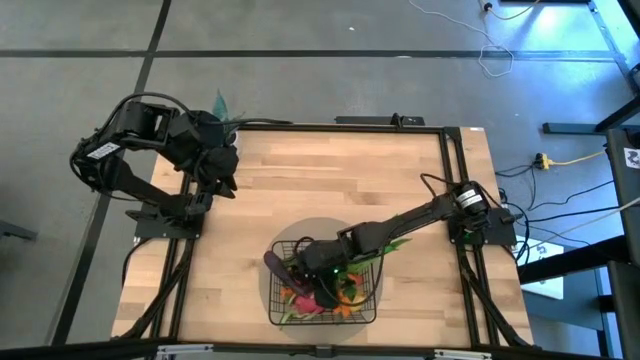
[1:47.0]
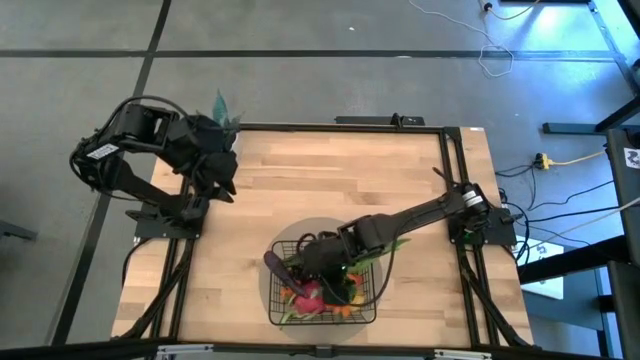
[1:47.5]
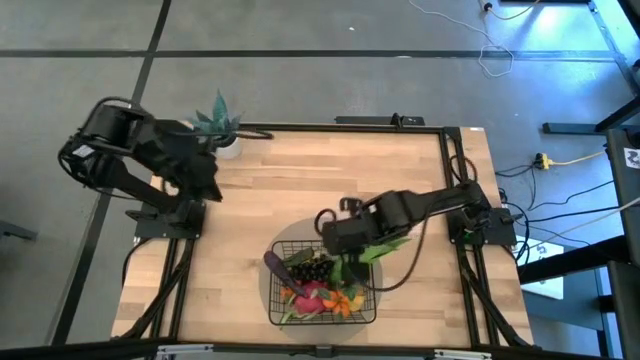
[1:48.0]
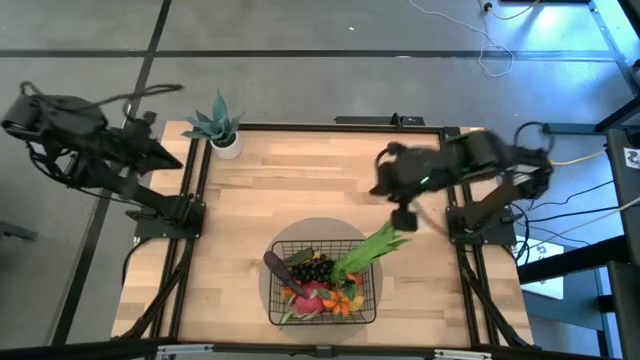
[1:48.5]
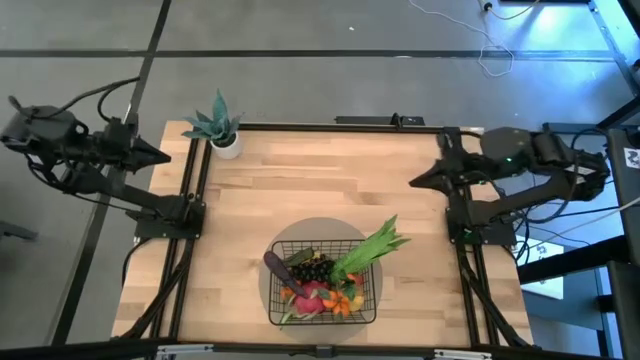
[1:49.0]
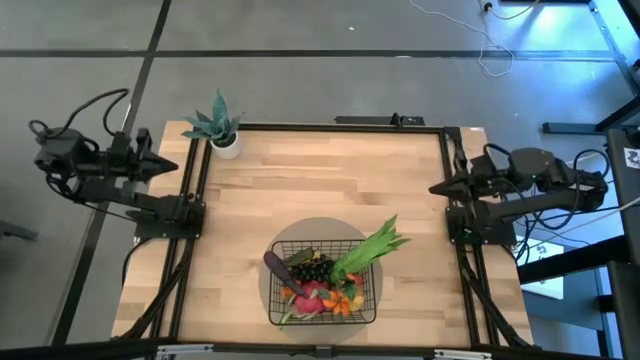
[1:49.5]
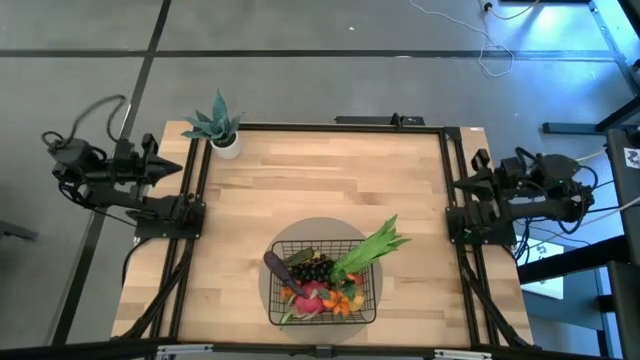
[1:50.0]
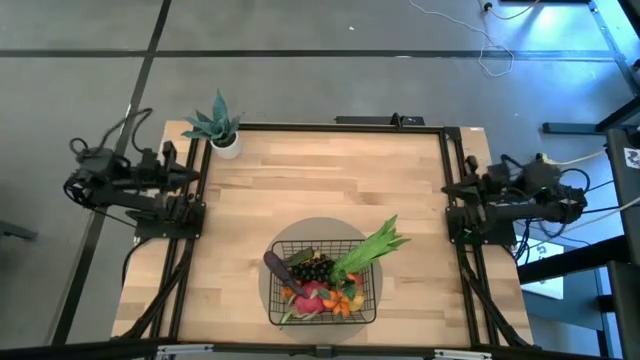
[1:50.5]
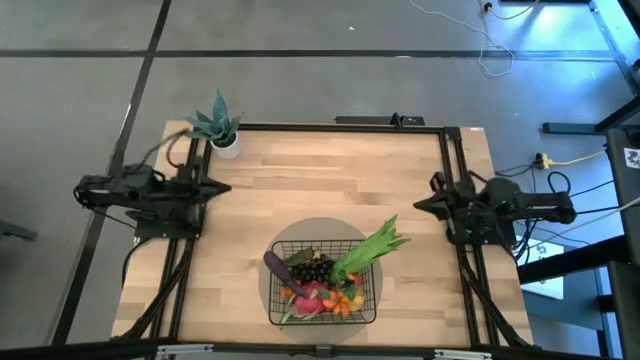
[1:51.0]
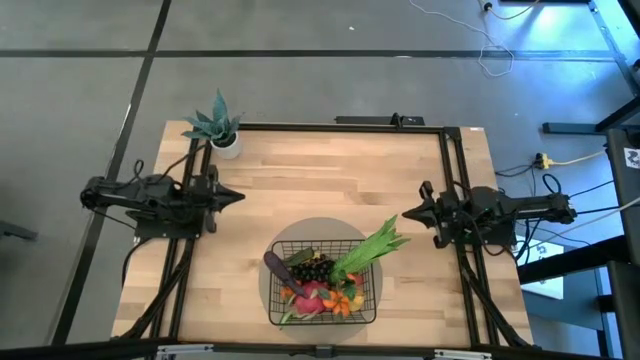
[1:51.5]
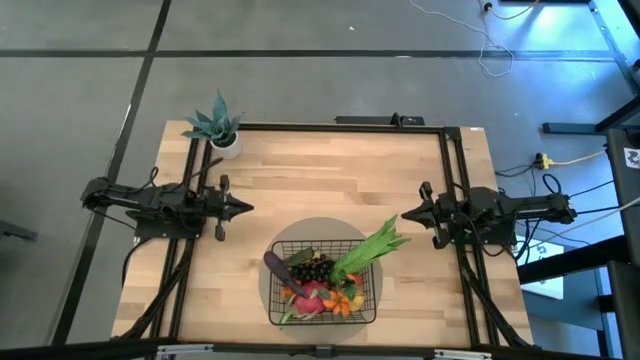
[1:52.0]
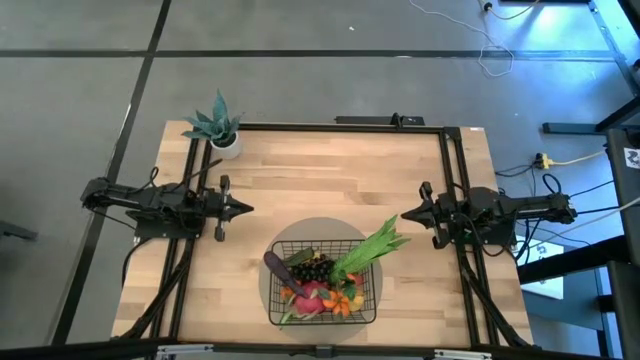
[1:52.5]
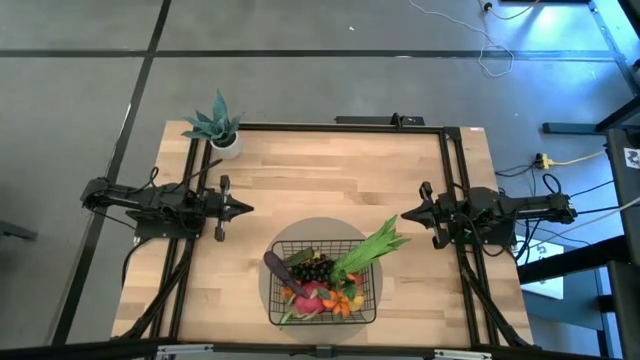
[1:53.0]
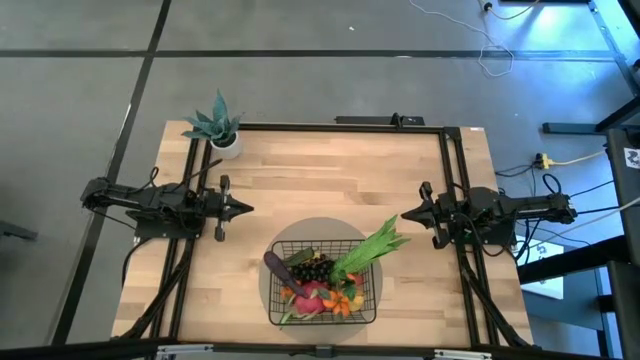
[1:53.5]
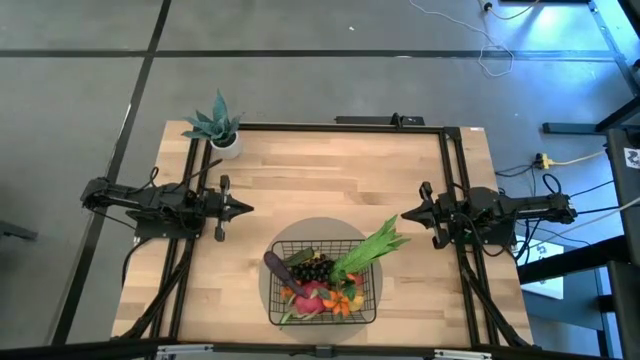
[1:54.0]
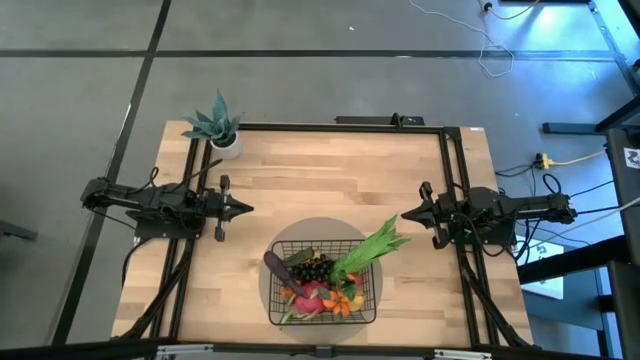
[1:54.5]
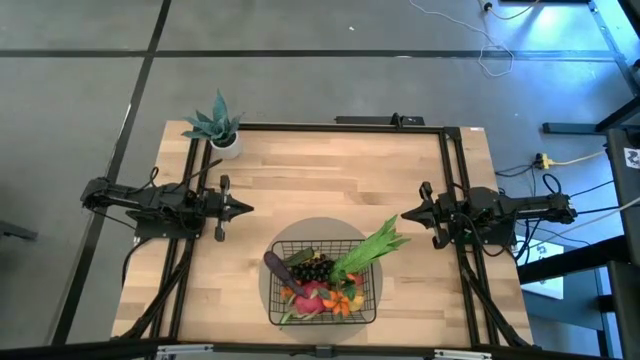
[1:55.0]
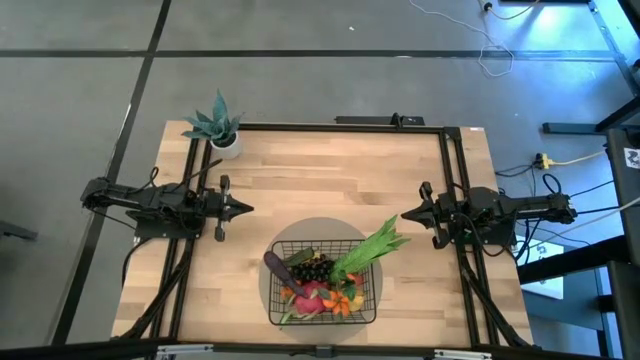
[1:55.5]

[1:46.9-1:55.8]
Task: Build produce basket
Return to Home Position

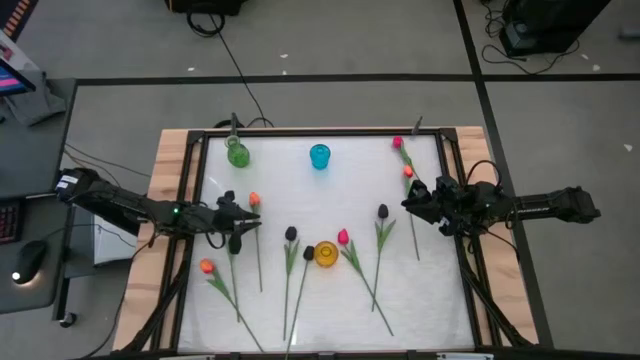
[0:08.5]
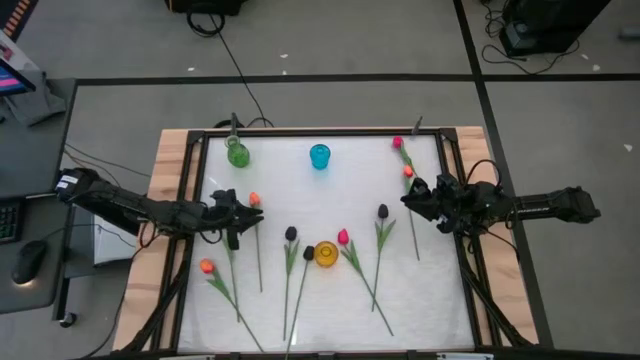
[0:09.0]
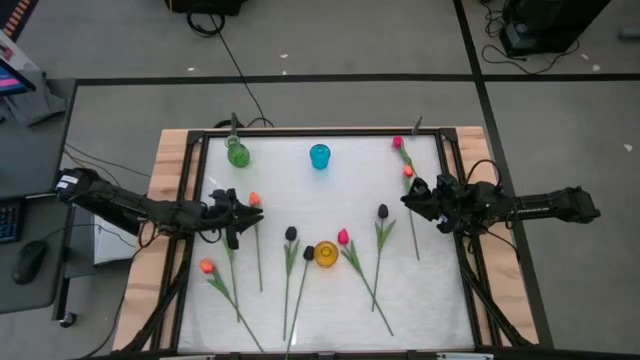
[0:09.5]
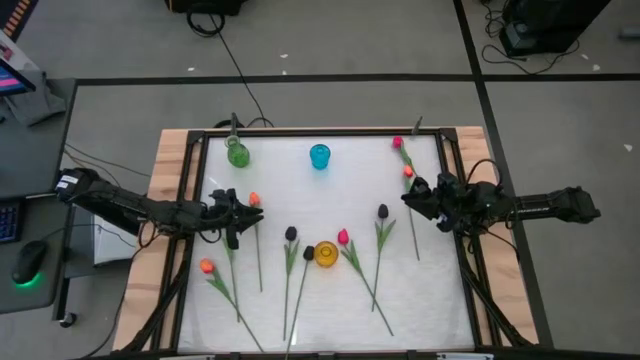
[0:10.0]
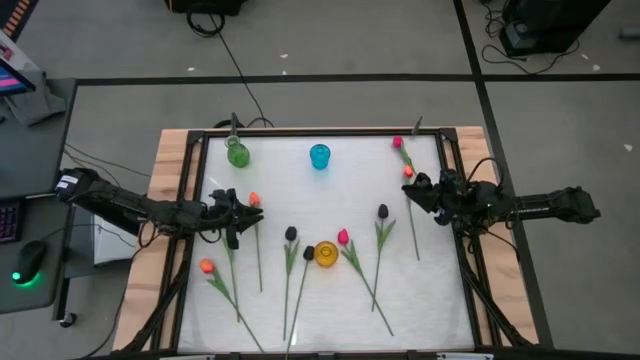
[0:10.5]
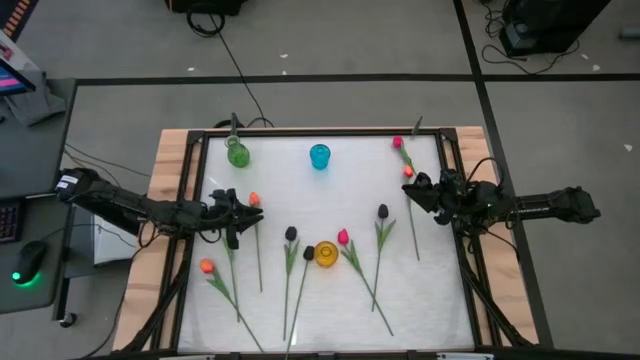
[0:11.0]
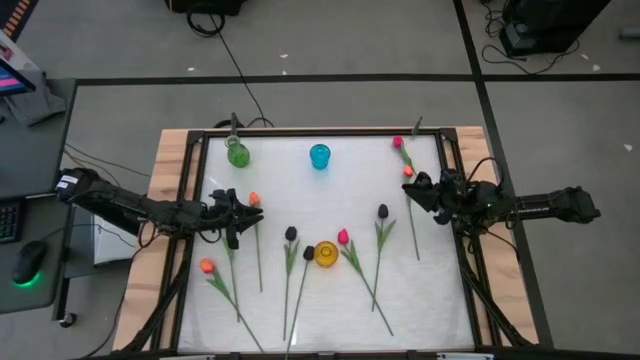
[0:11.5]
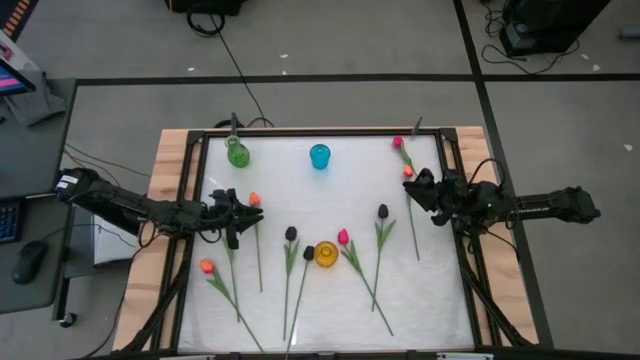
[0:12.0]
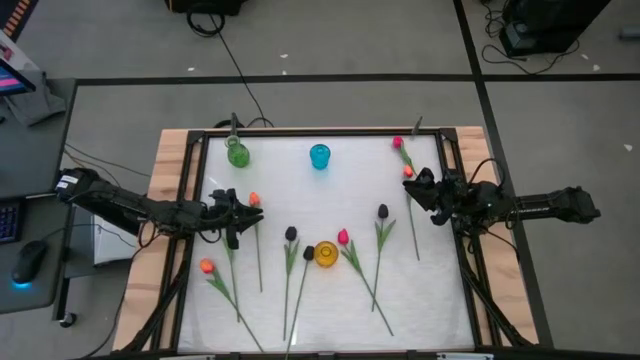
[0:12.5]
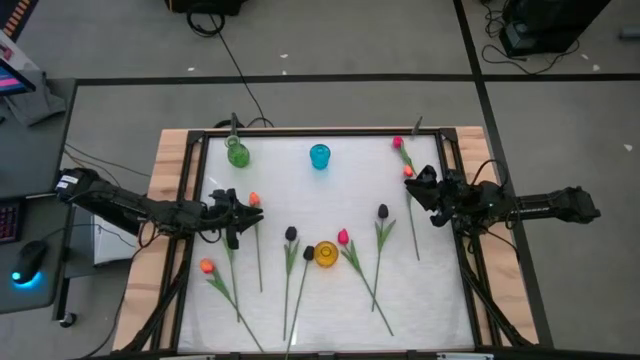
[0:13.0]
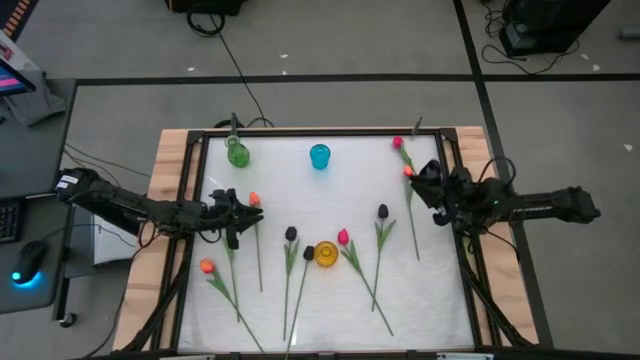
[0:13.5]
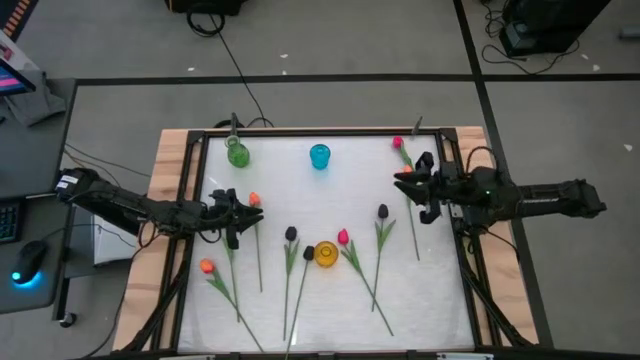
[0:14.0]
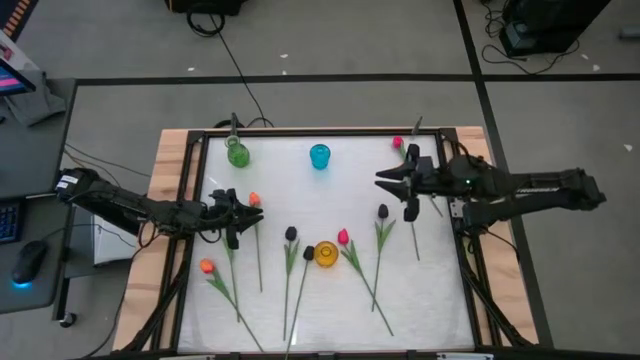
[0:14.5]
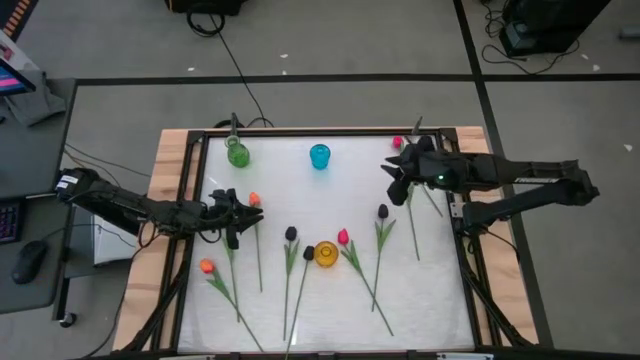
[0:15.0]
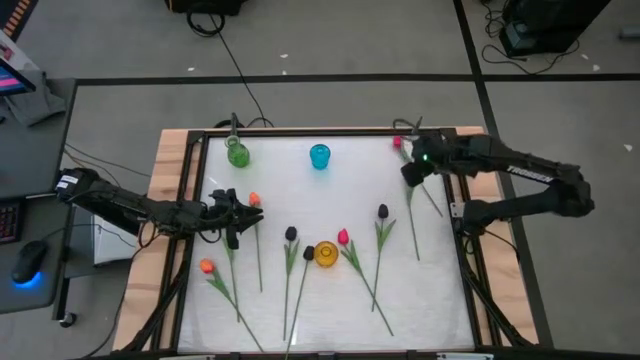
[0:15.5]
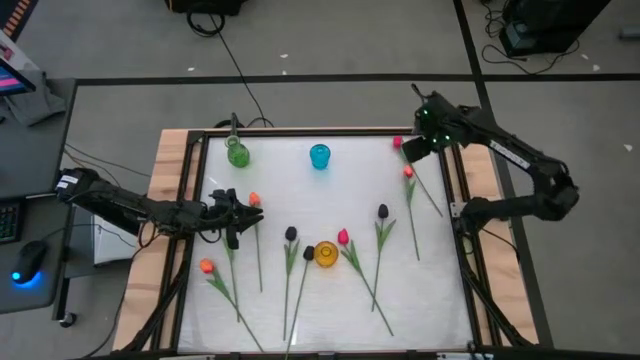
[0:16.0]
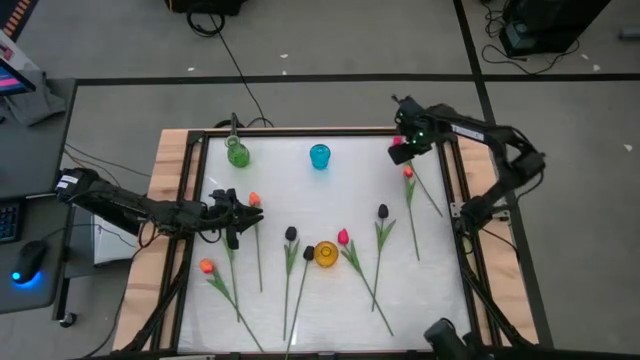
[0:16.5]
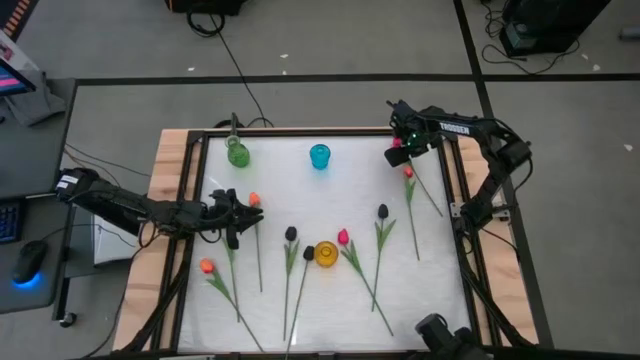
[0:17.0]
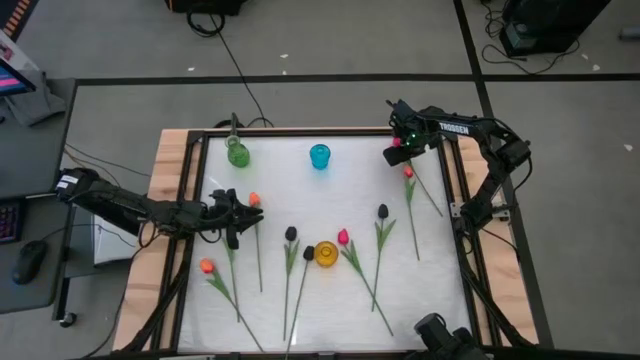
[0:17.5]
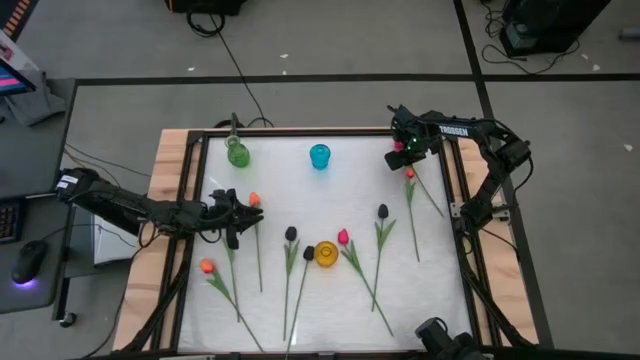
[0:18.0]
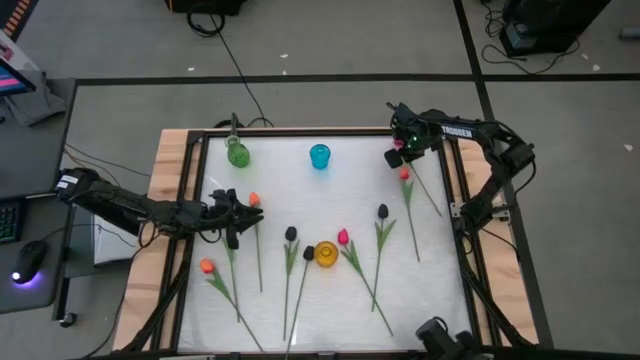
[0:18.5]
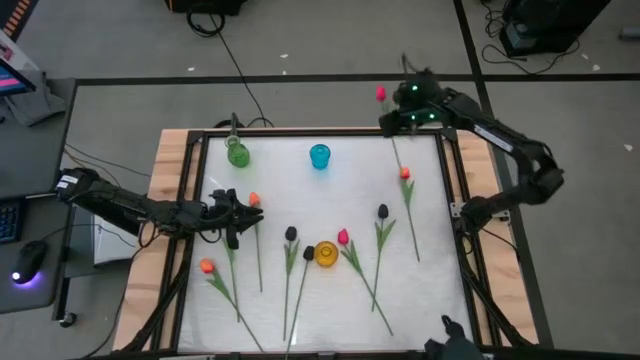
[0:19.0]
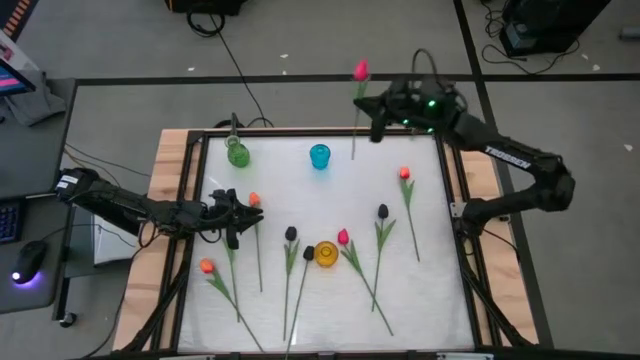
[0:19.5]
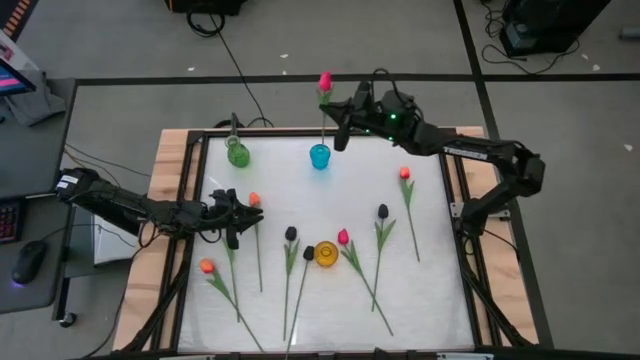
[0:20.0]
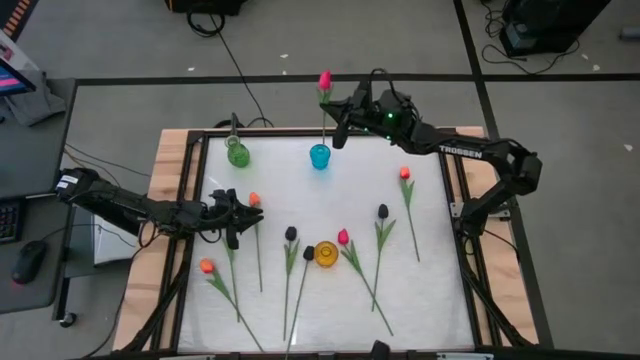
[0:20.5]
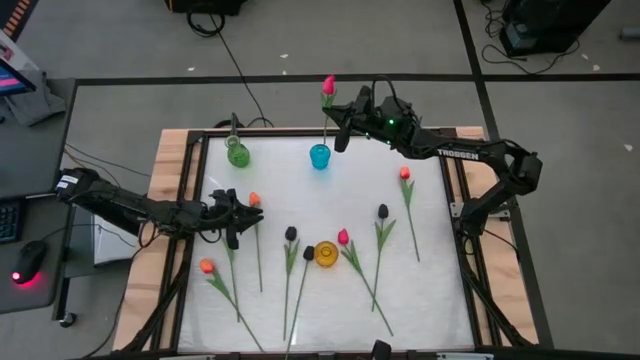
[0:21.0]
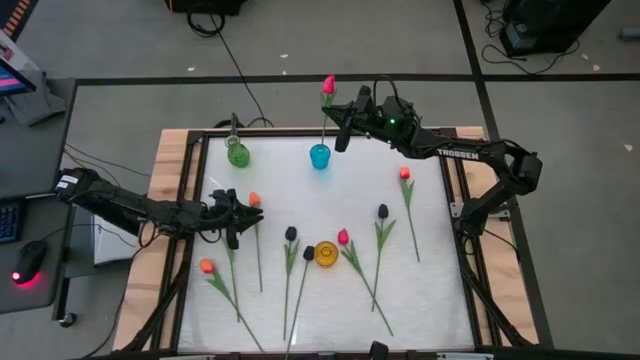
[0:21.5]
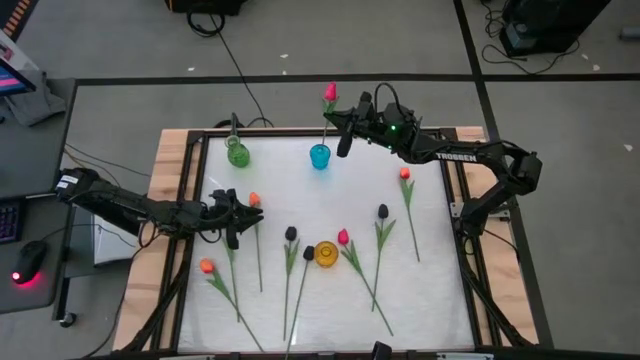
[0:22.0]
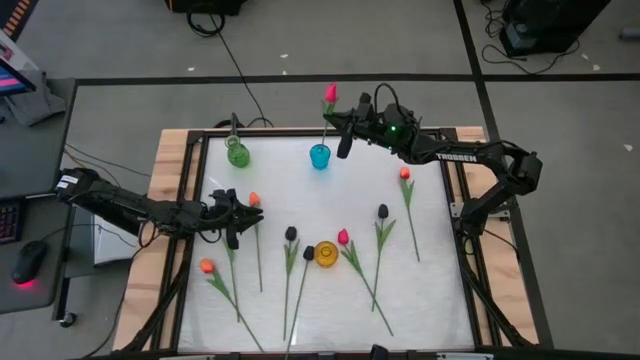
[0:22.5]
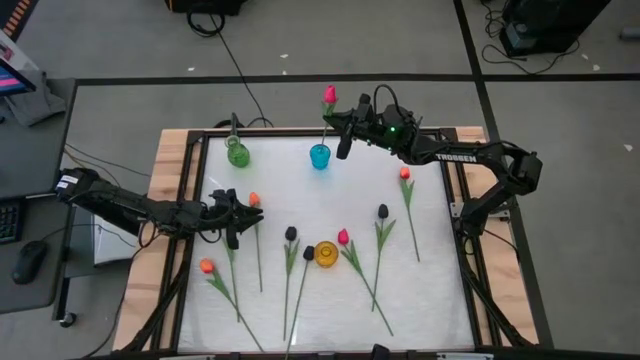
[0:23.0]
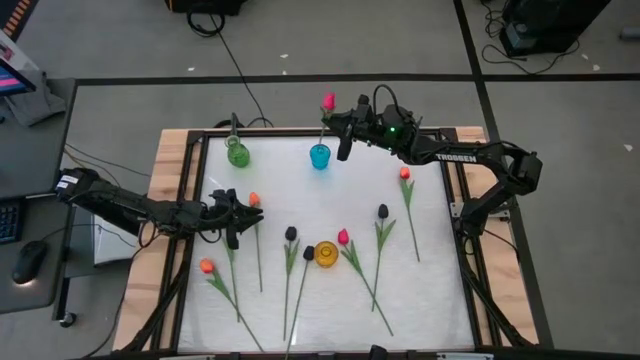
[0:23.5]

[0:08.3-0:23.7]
Task: Sort flowers into vase by color
Put the top pink flower into the blue vase
